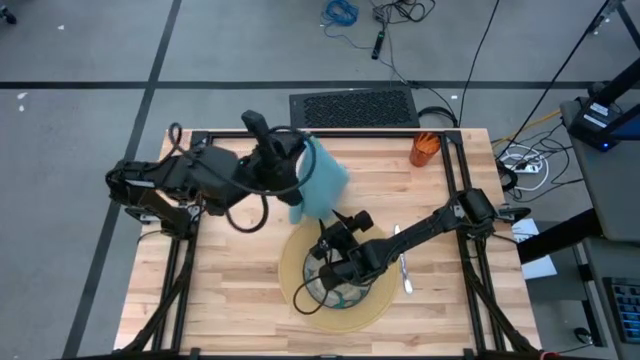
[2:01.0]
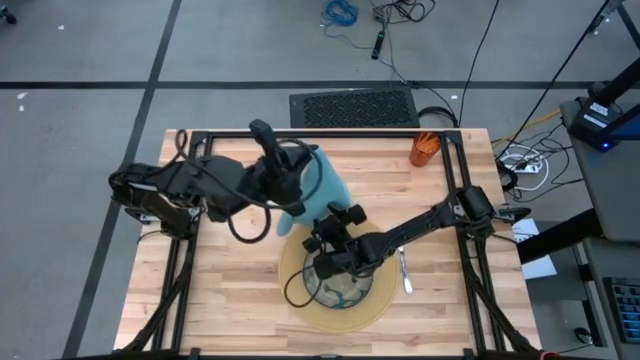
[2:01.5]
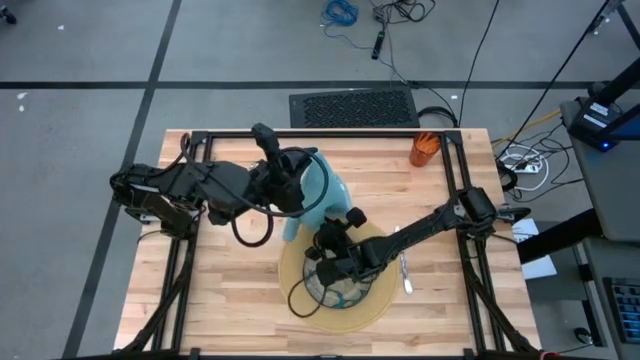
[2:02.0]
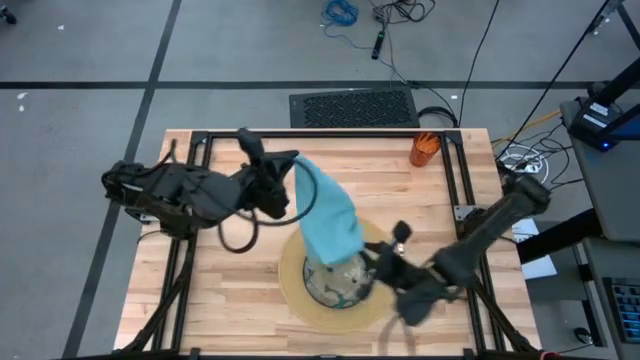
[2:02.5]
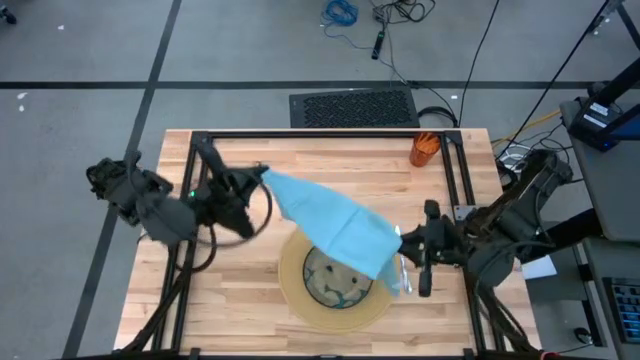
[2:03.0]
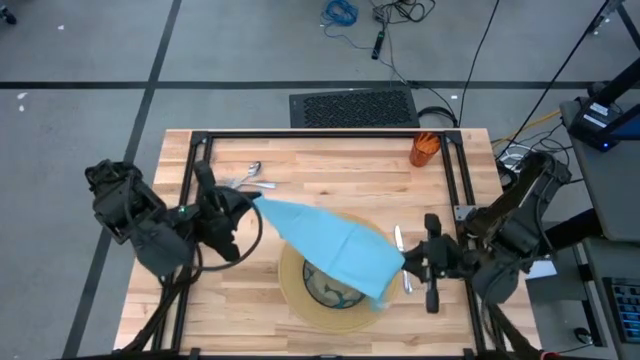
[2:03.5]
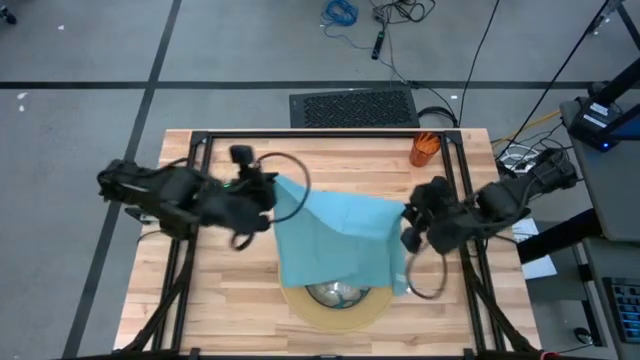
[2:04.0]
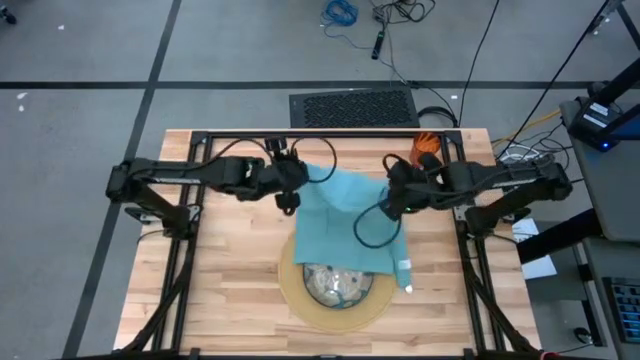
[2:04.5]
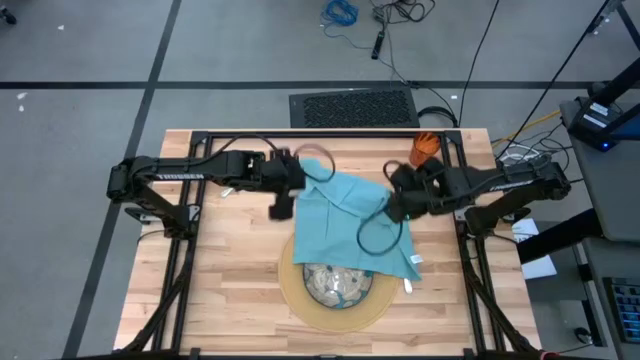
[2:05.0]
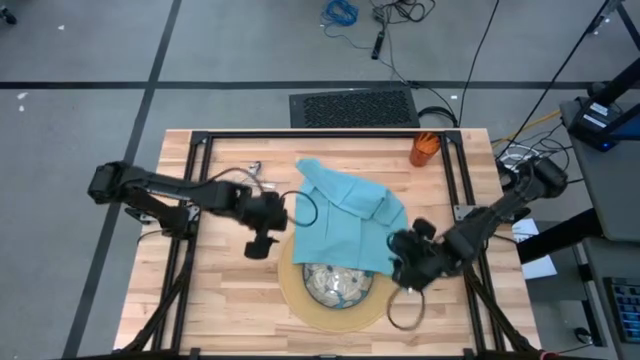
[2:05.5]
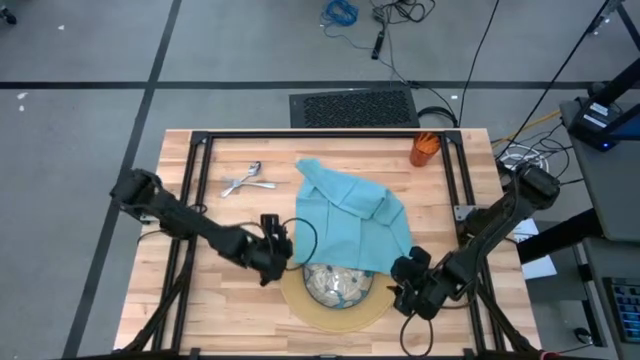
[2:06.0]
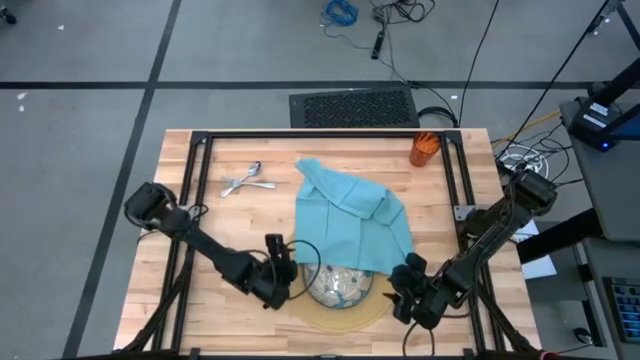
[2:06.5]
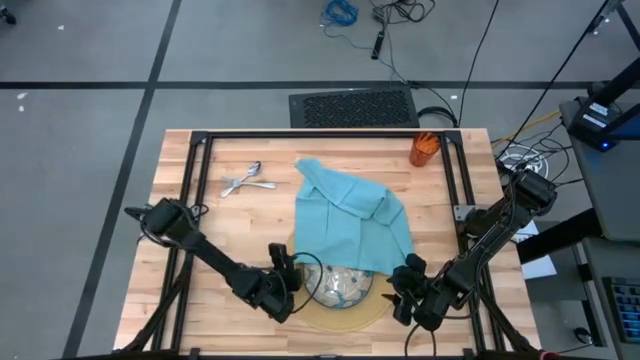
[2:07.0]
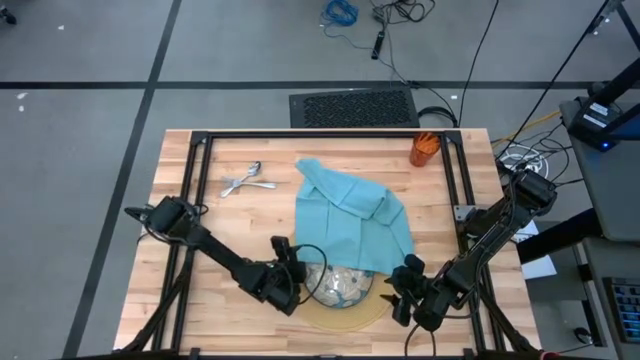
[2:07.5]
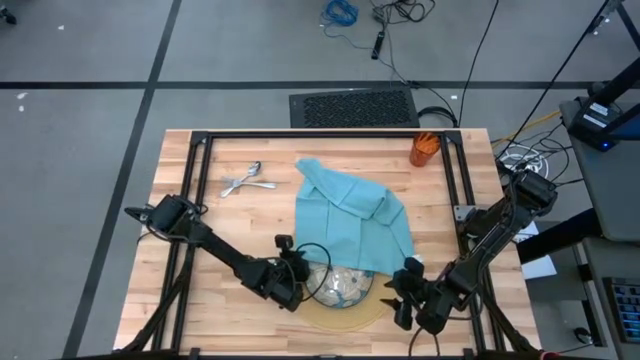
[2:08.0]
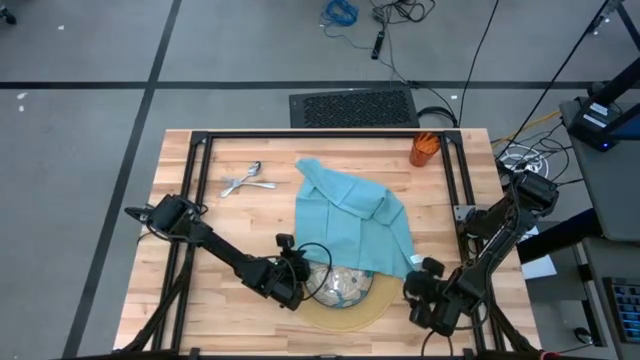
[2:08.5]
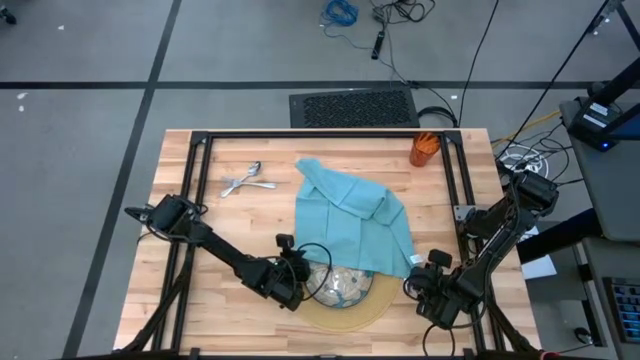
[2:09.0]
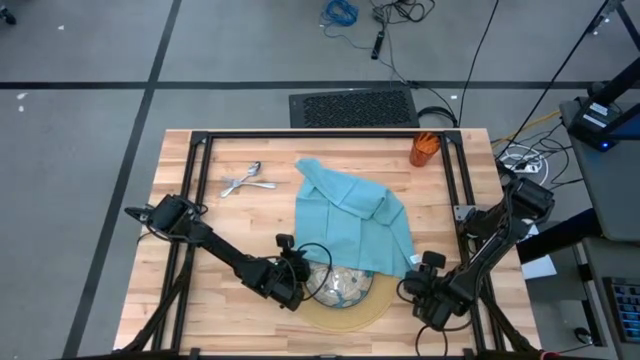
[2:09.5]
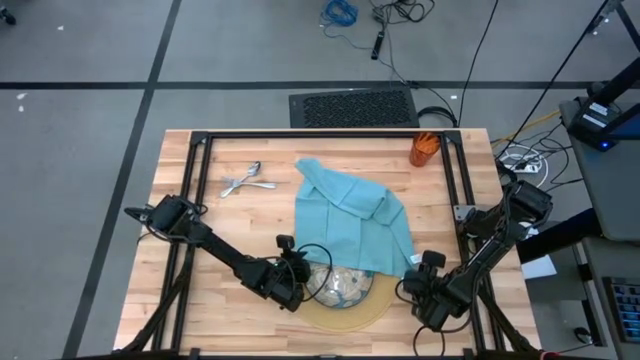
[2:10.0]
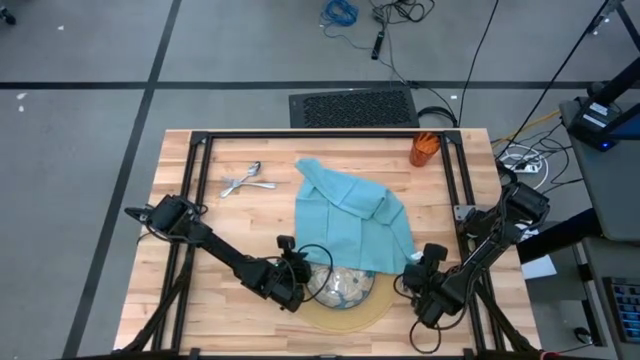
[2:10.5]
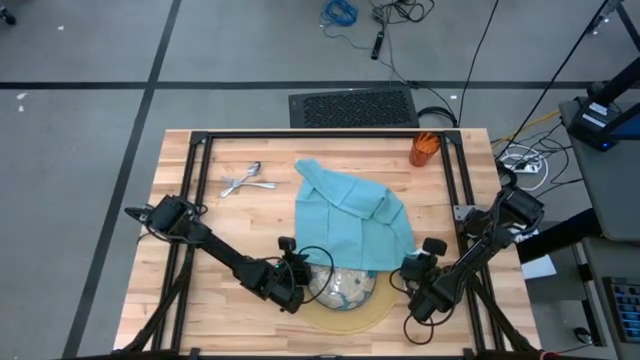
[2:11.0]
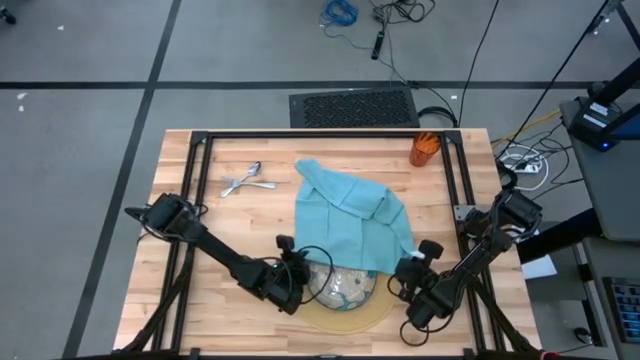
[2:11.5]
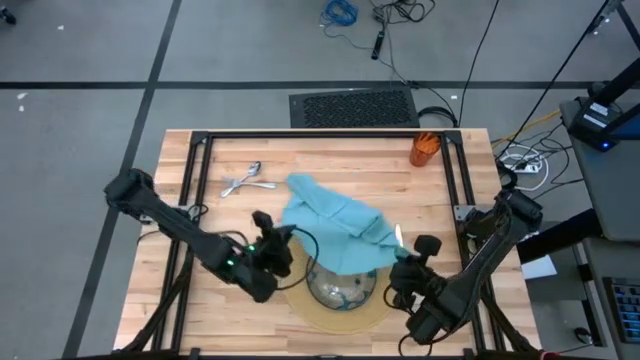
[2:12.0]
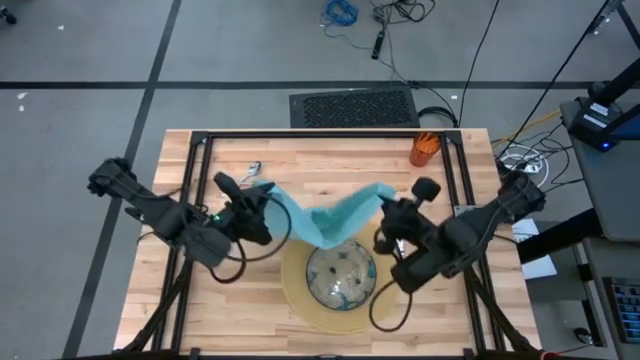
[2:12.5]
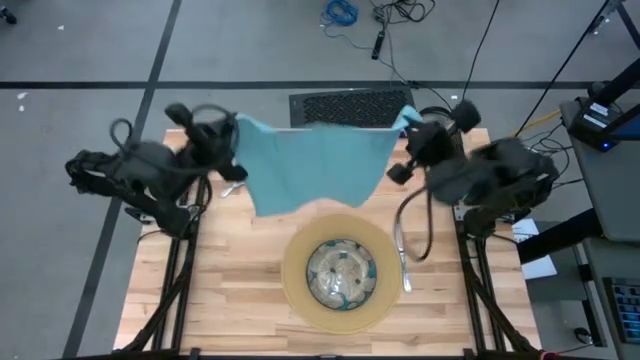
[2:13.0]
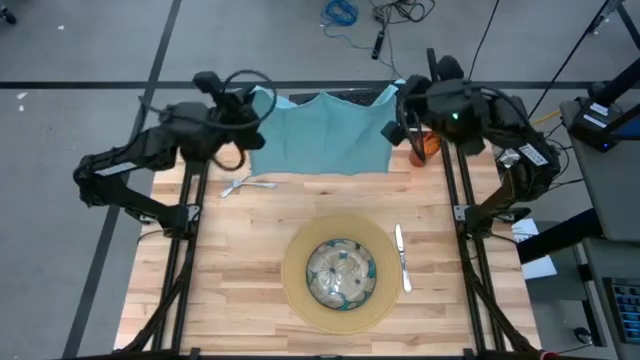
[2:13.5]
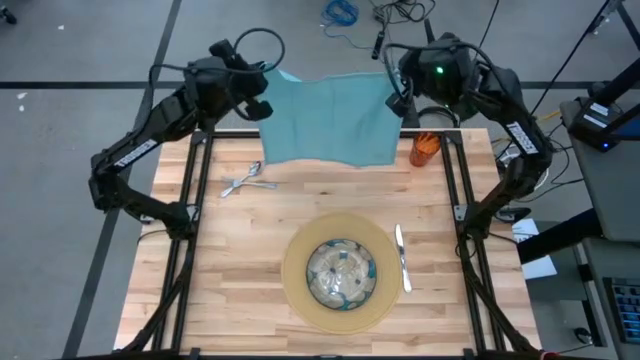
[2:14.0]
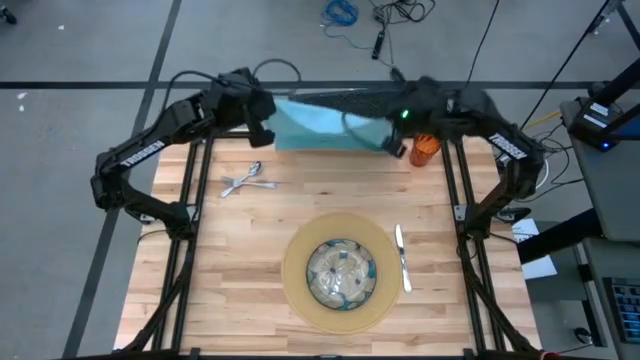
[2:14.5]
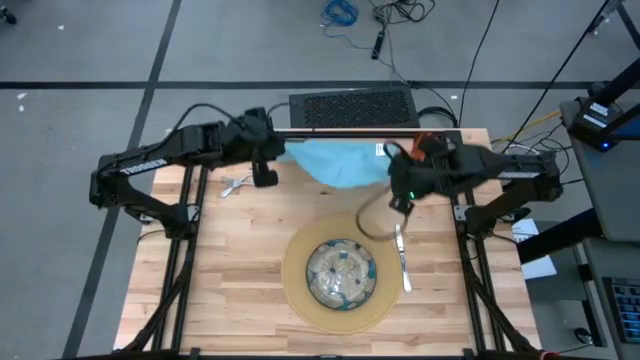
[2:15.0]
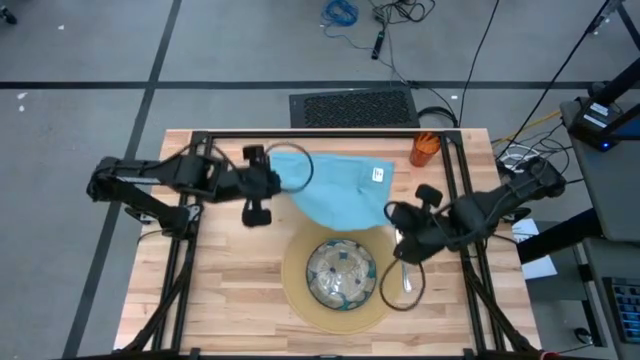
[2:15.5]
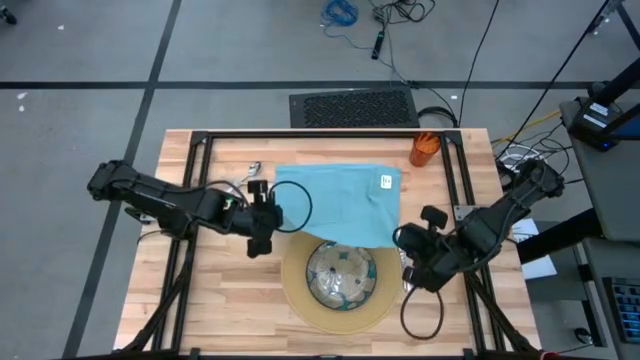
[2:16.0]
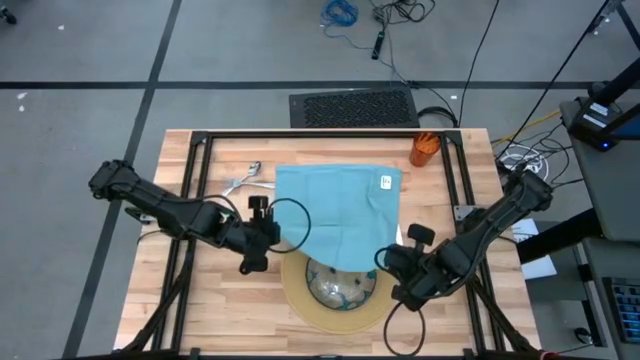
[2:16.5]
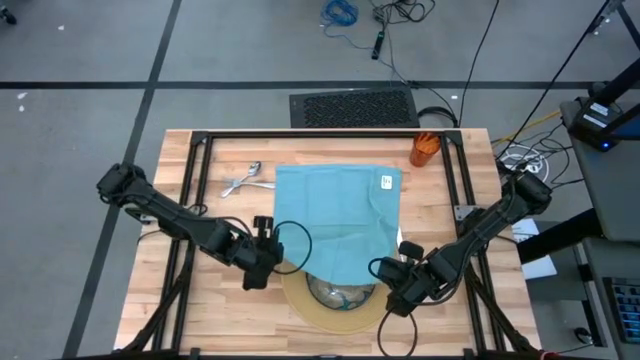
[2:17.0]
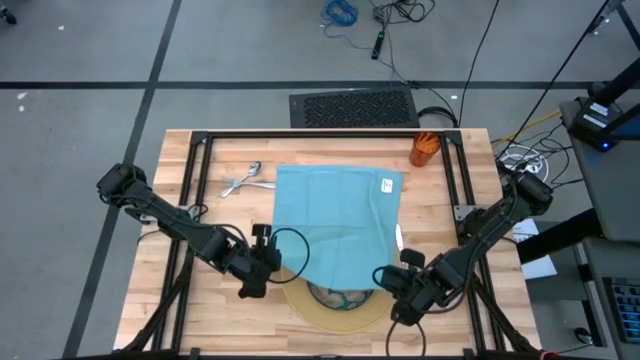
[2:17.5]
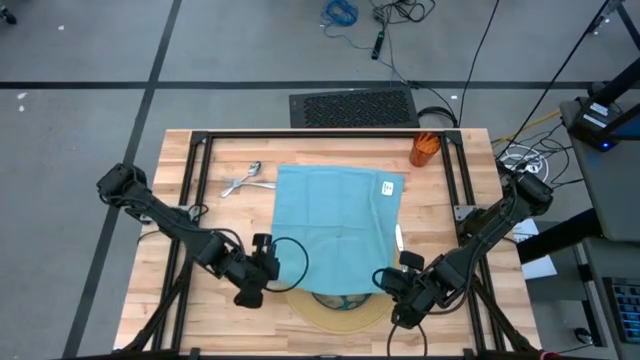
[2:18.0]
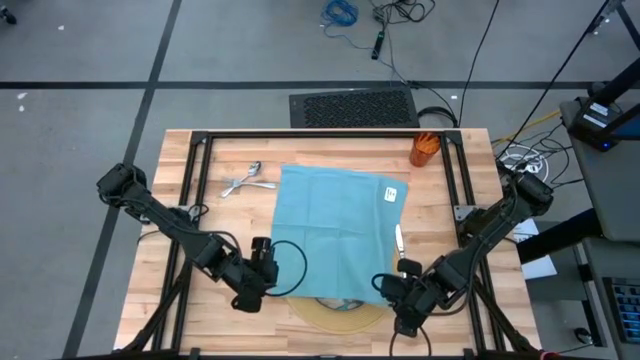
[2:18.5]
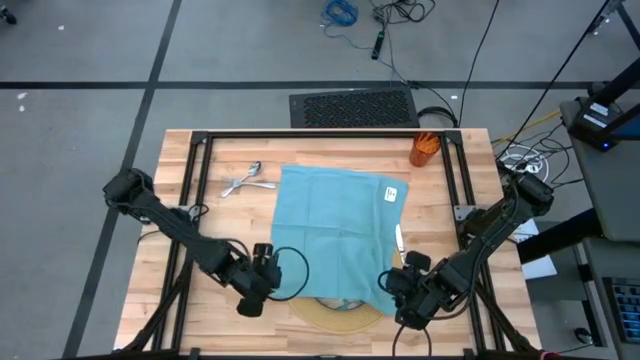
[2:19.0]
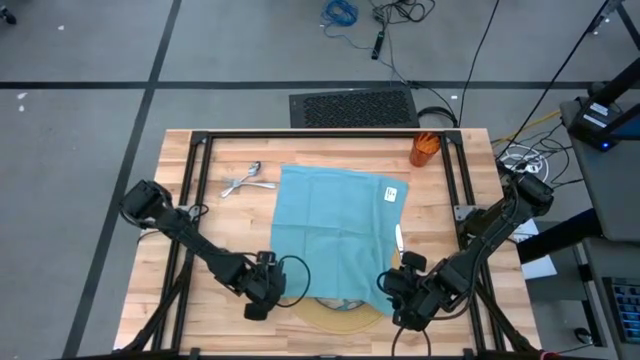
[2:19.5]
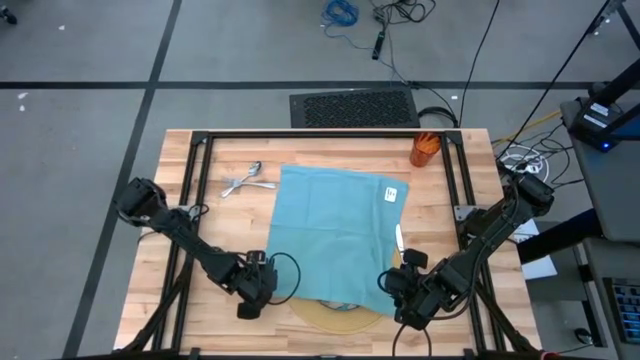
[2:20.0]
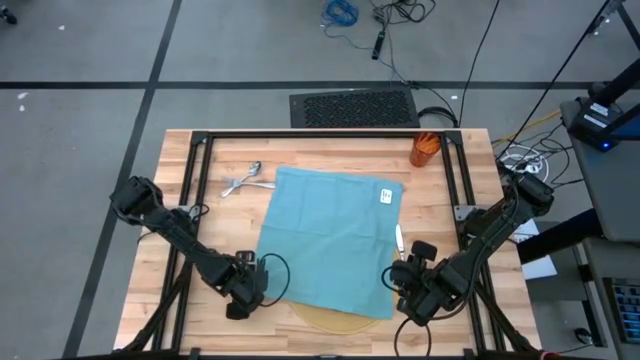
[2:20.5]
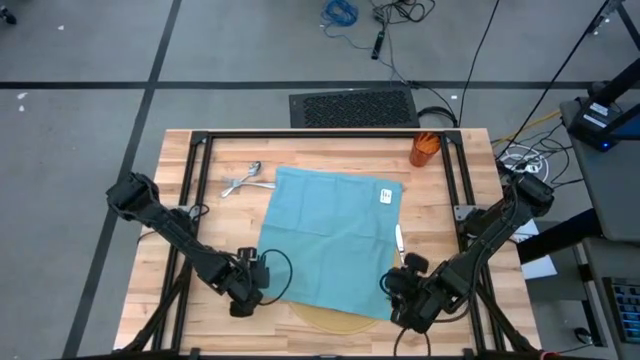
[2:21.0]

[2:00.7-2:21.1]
Task: Set table place
Fold the blue napkin
